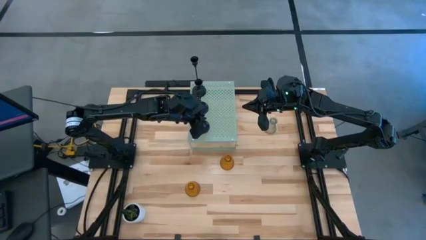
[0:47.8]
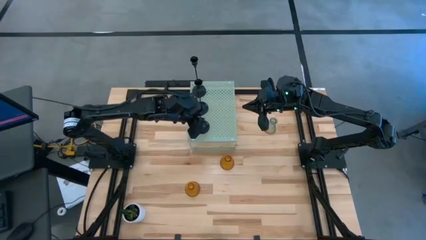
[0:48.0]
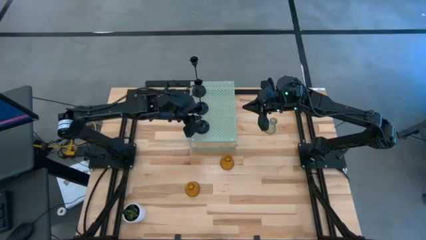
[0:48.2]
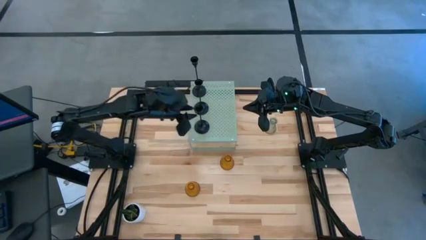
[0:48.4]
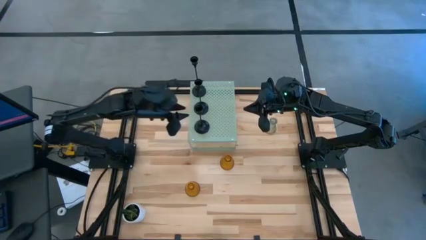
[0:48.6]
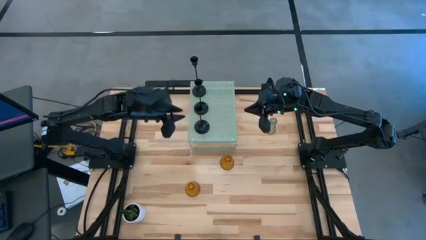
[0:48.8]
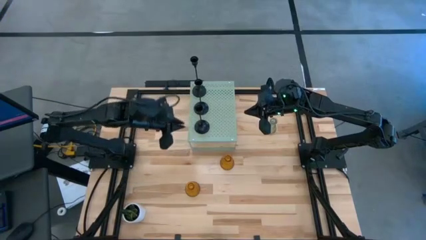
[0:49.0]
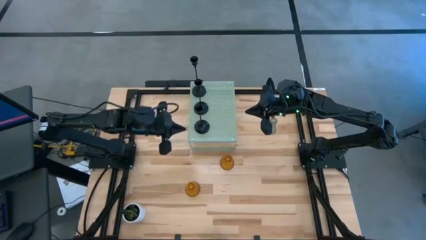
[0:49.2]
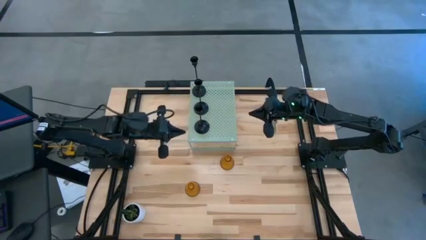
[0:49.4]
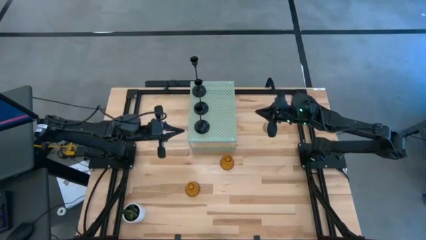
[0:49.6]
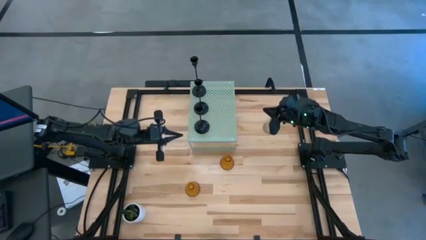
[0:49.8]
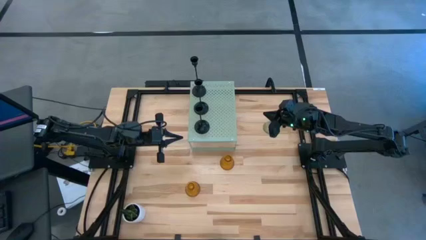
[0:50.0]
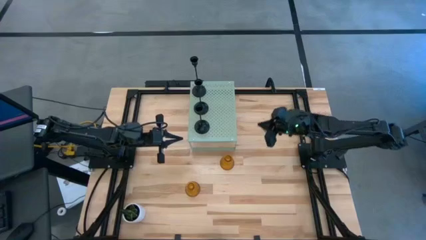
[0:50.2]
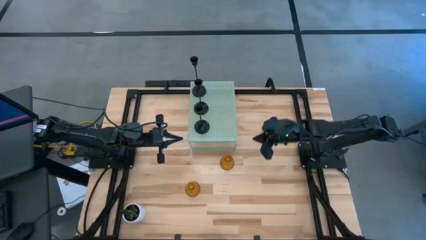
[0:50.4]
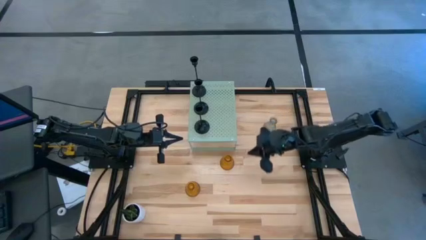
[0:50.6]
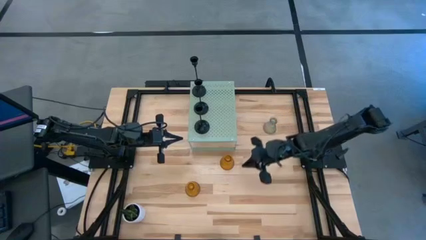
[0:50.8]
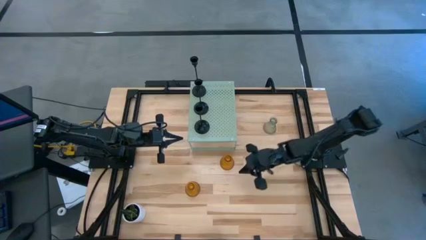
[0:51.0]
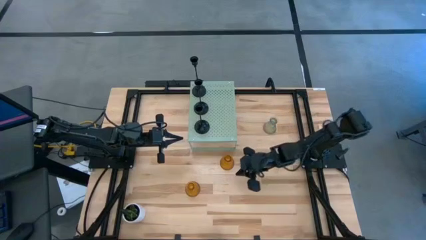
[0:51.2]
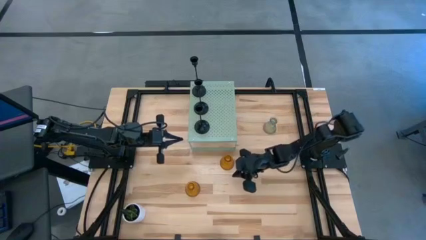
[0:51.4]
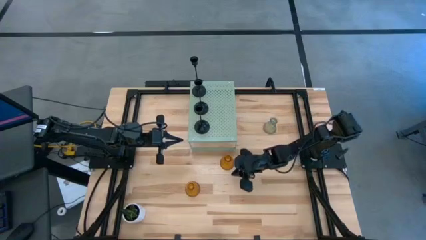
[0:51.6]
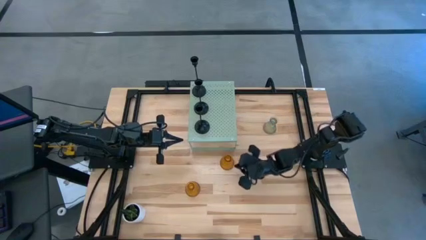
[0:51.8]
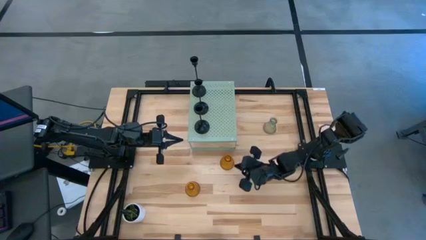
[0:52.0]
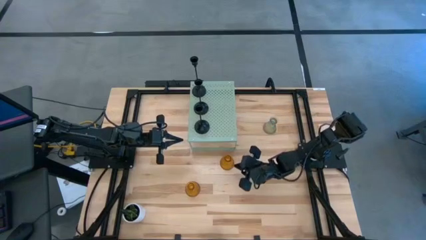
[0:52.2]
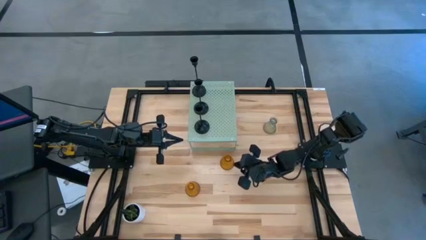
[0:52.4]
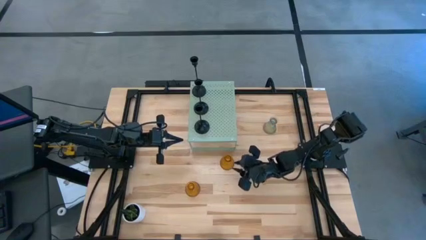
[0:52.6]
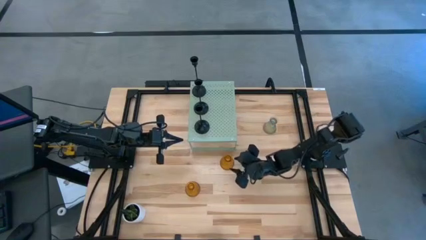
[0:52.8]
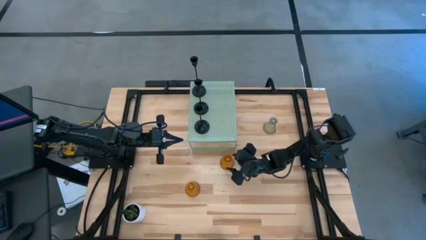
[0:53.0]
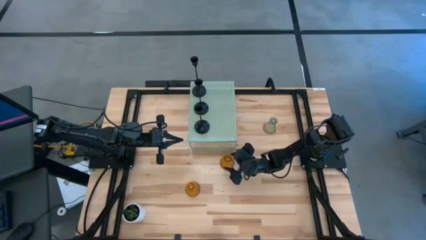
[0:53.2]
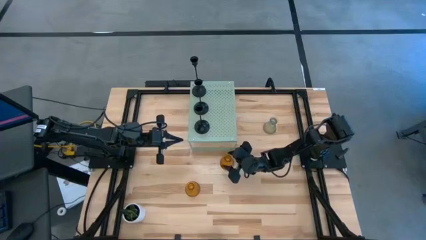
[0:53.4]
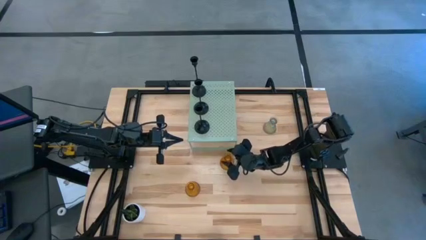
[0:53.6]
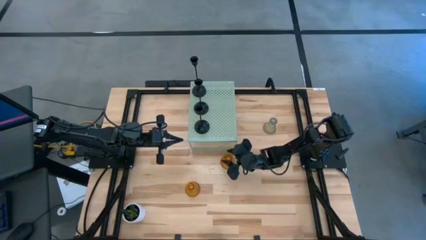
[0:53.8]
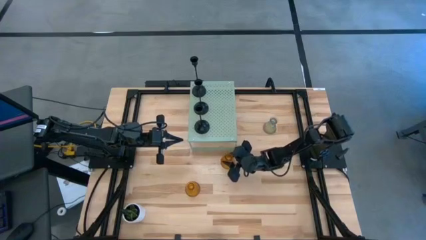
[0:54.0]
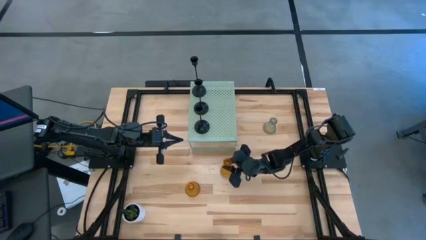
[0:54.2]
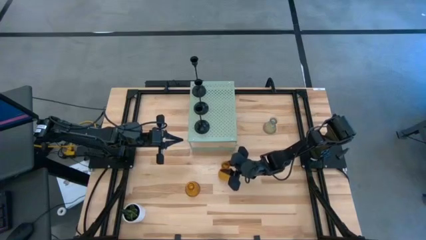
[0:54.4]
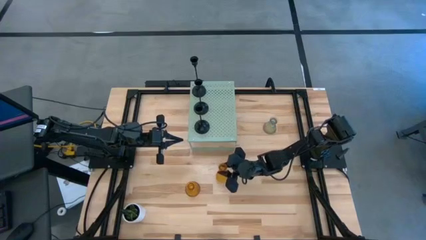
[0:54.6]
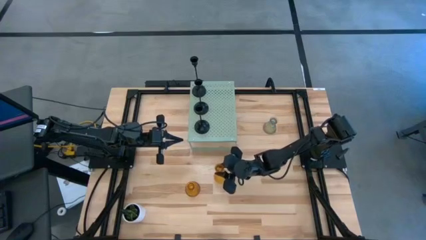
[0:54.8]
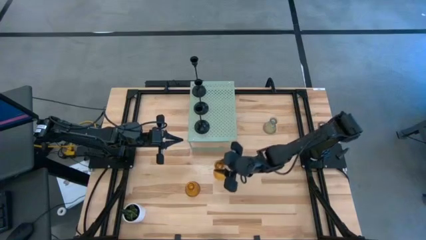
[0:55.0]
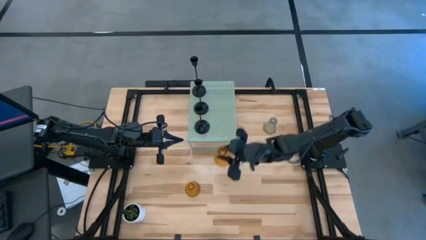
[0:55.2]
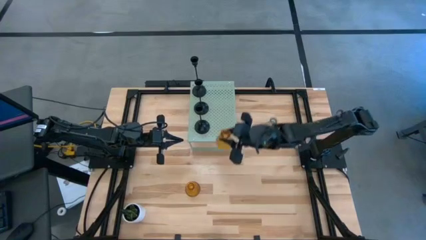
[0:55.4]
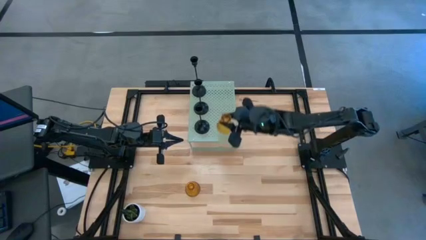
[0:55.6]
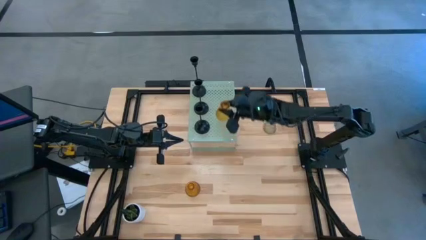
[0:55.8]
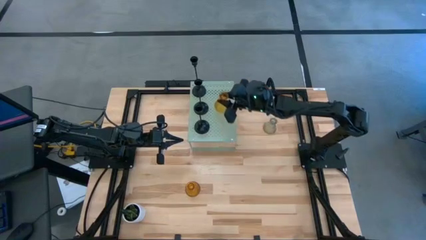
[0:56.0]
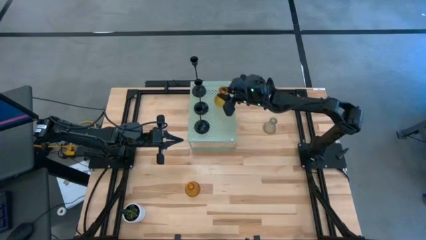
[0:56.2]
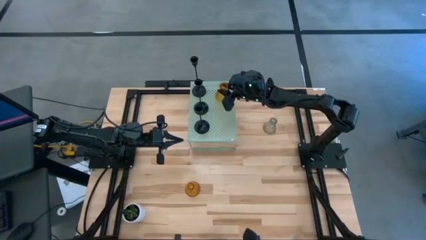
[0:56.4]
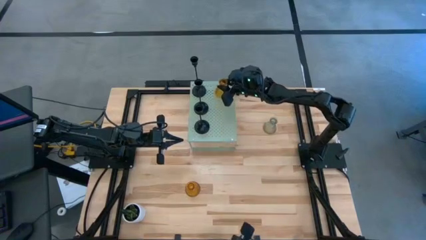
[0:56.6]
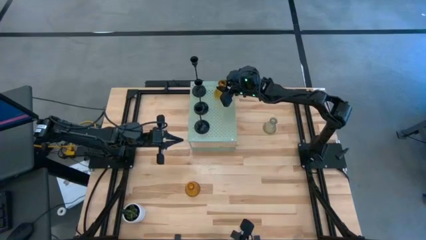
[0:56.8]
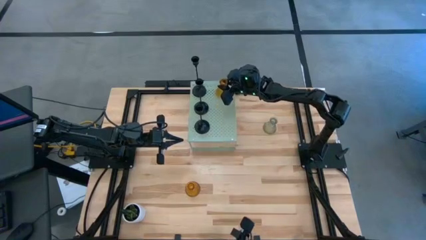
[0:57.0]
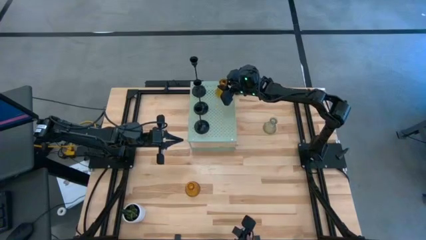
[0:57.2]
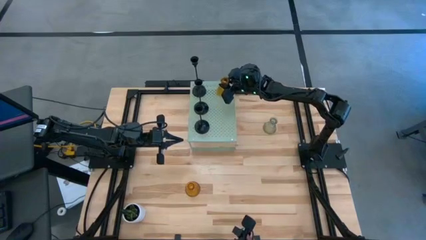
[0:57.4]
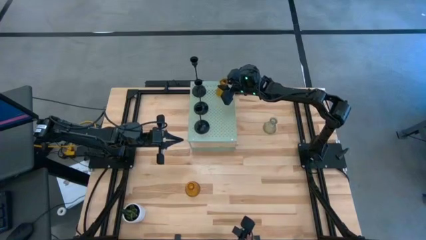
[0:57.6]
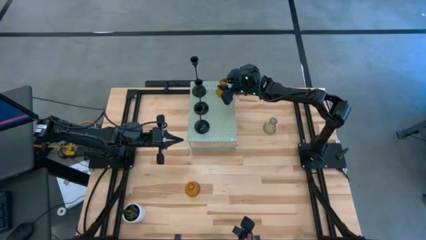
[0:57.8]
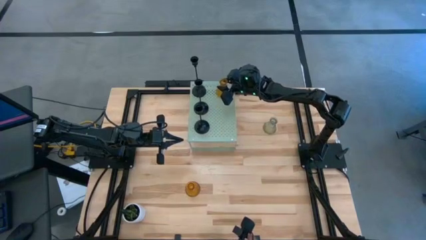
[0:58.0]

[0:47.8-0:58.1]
Task: Pick & Place candle stick holders
Put the right yellow glass candle holder on the shelf

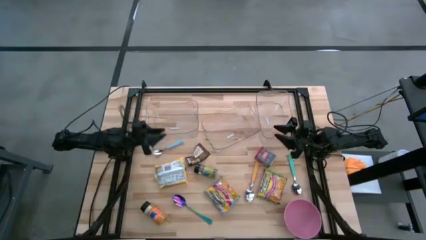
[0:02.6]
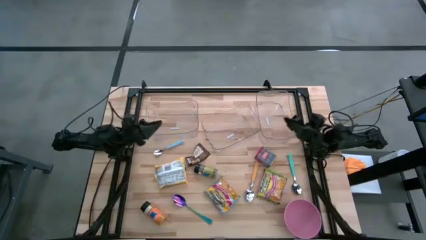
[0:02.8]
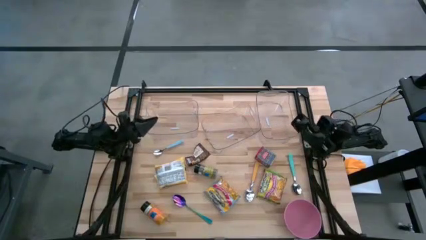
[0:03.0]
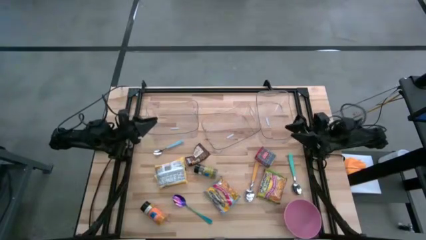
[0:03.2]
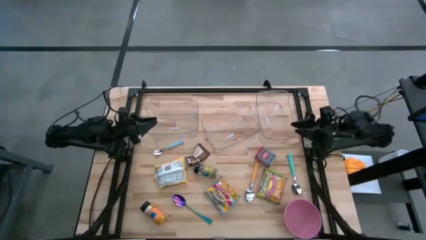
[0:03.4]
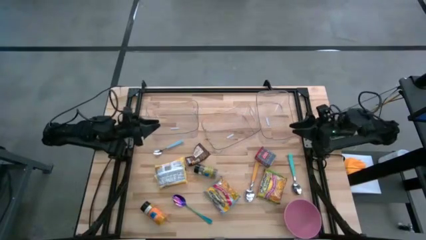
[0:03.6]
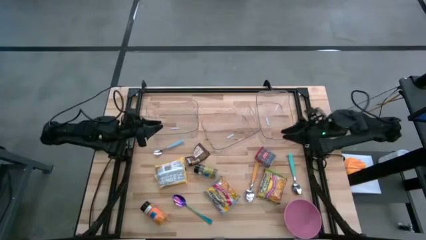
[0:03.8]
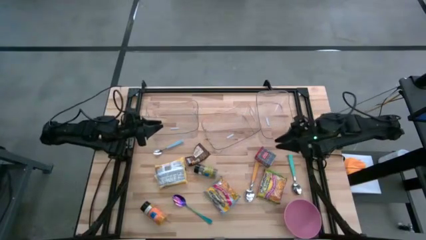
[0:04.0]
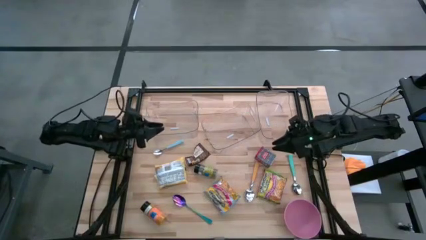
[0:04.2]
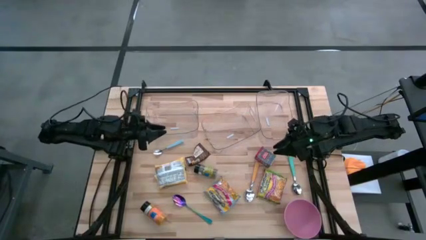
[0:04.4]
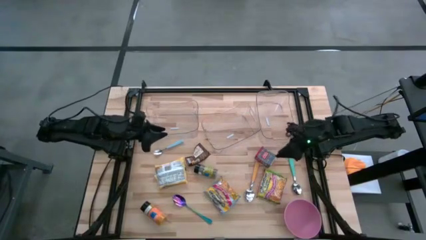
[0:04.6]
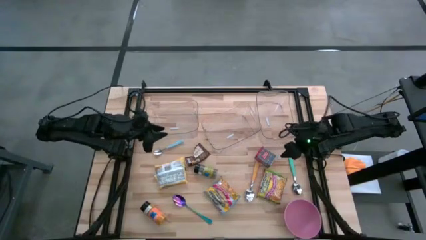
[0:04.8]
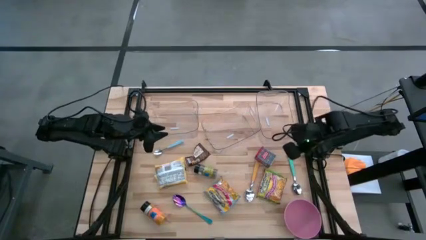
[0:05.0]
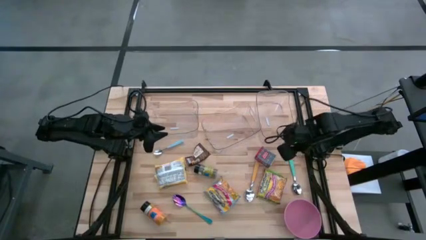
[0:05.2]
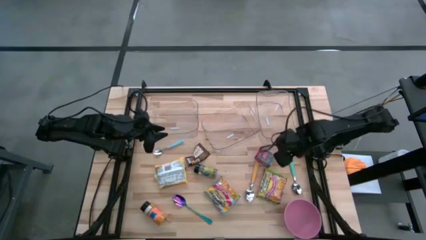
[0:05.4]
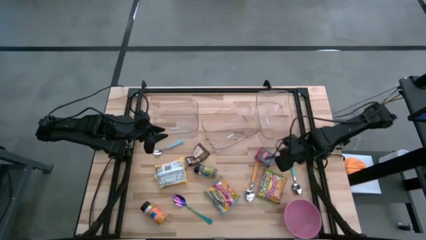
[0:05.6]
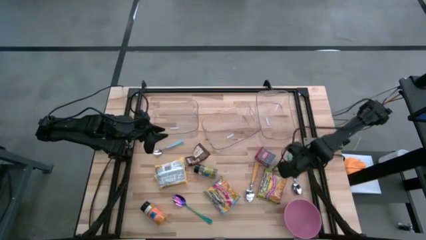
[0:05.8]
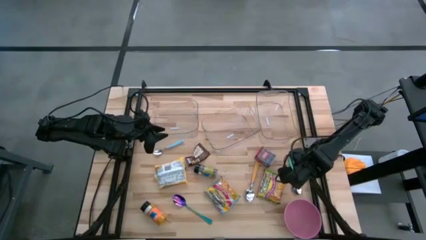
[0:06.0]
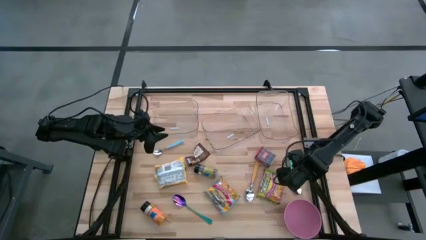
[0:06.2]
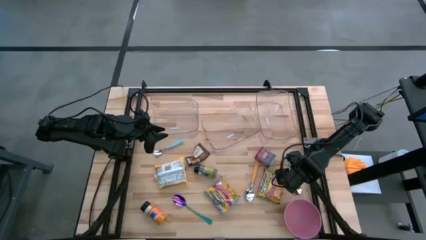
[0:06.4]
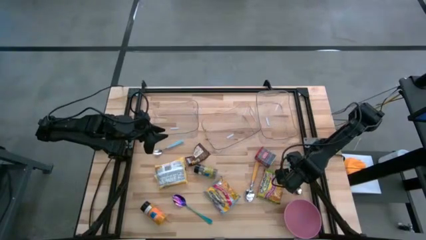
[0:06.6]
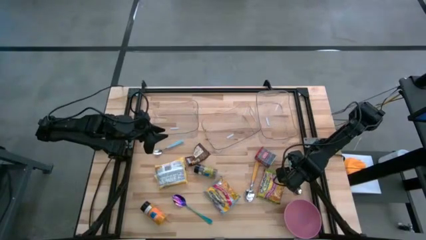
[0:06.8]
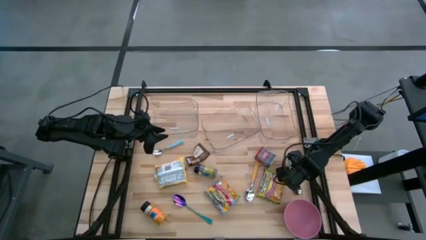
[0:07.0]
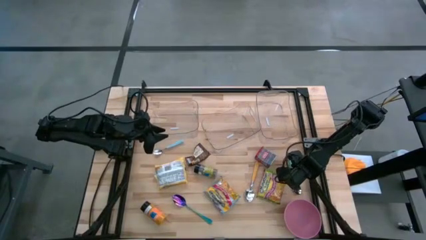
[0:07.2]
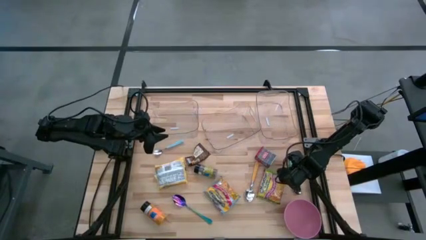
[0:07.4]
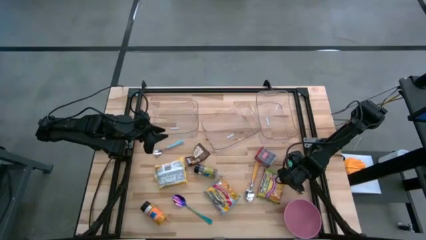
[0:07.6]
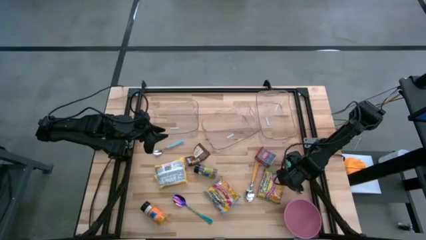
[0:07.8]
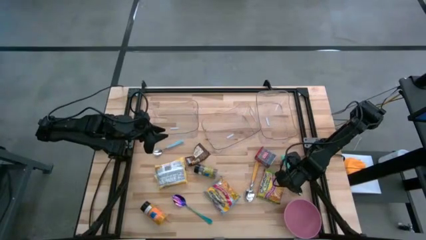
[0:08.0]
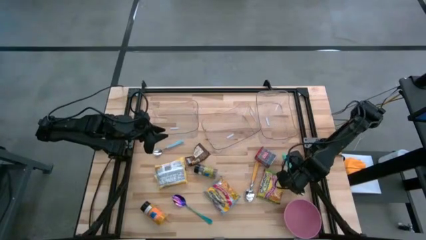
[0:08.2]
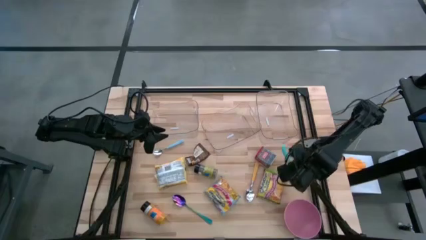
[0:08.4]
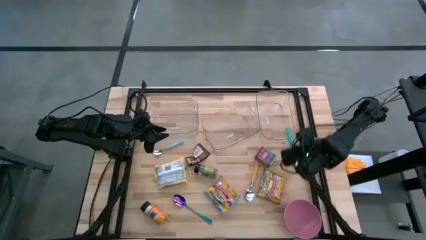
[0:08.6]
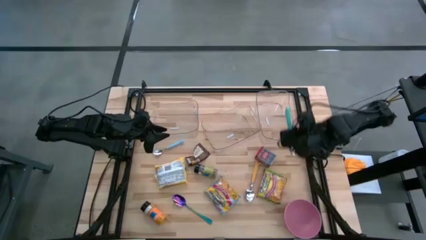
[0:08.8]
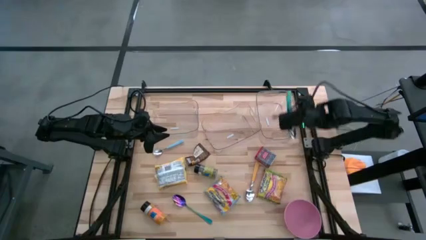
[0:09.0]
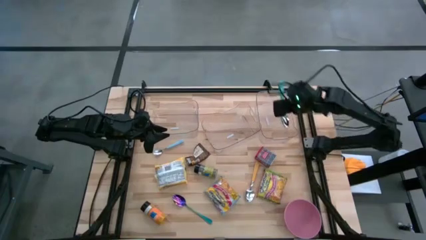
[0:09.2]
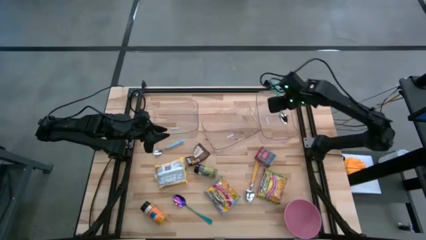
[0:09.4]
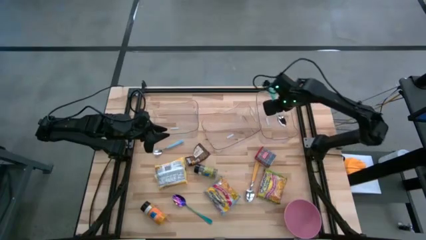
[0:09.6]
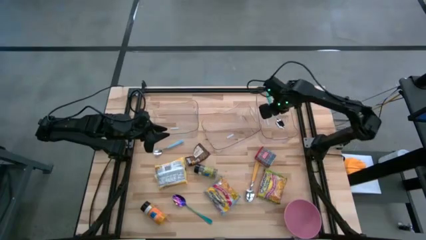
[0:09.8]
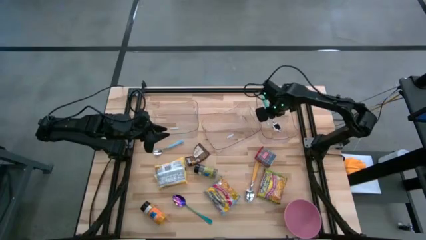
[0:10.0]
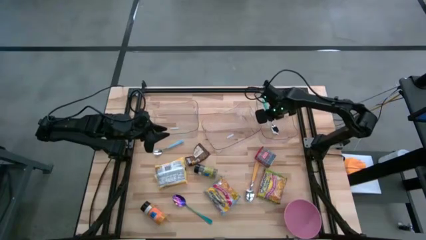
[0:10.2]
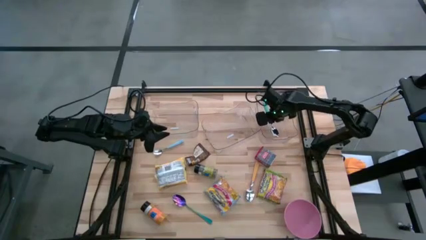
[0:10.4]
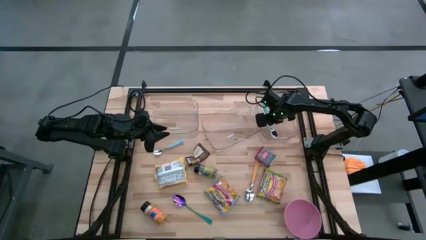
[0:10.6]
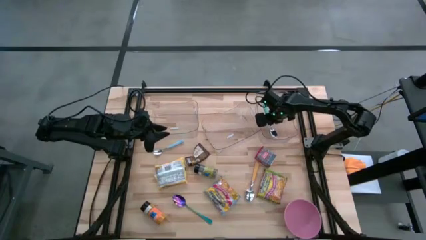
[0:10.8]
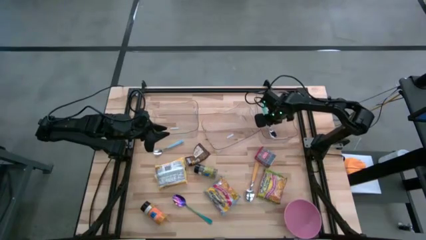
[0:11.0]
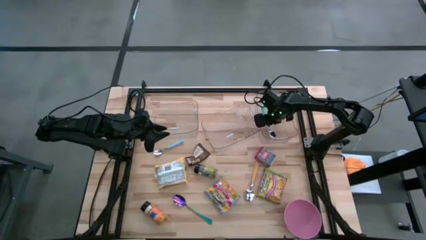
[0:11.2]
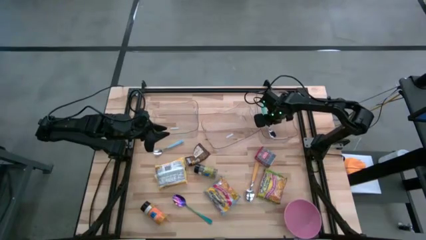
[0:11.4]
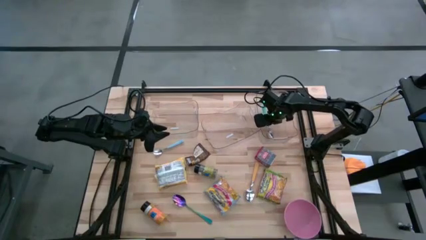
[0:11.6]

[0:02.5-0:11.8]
Task: Pick & Place Food Item
Put the light blue spoon into the right transparent bin
